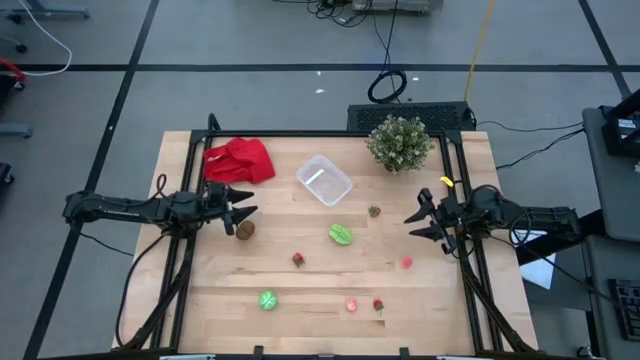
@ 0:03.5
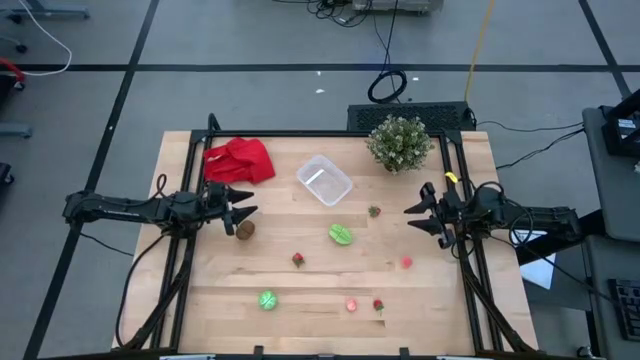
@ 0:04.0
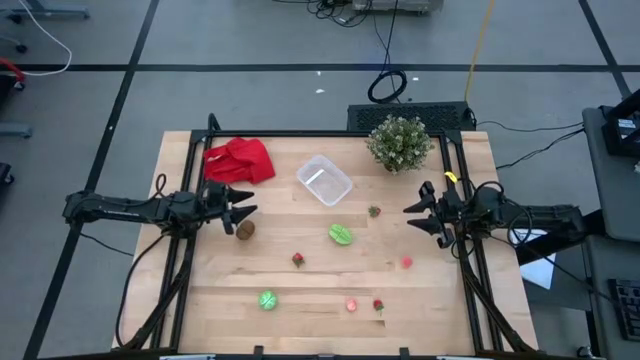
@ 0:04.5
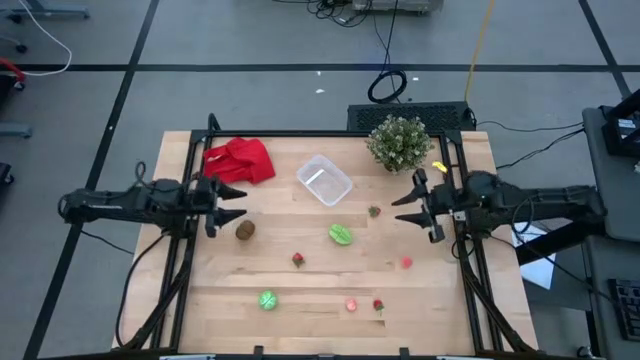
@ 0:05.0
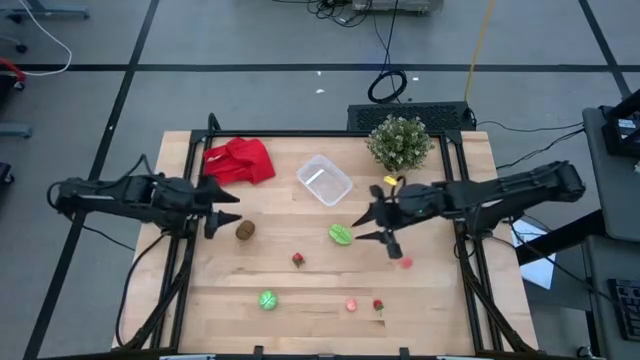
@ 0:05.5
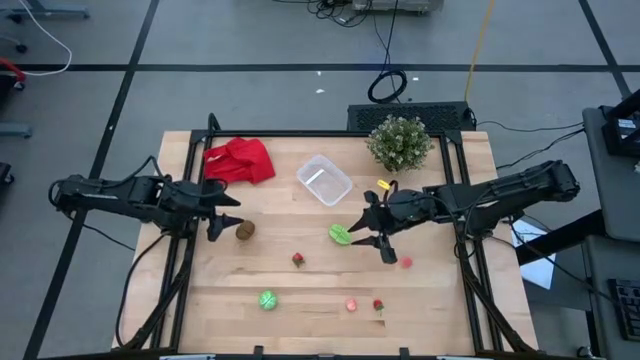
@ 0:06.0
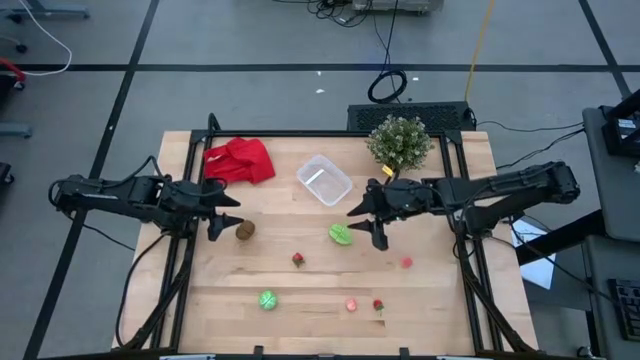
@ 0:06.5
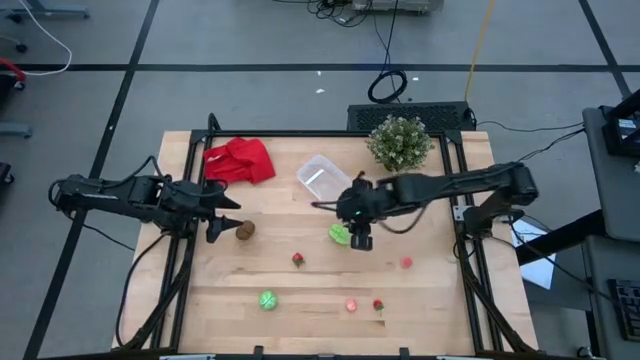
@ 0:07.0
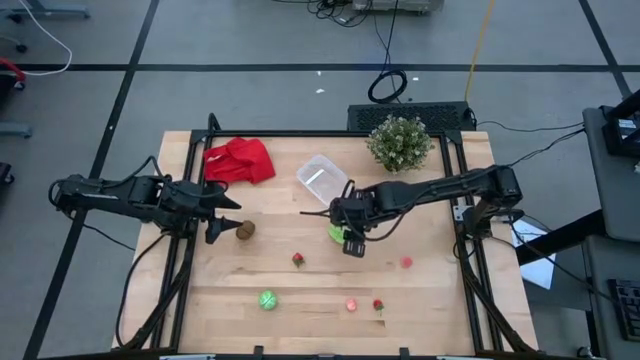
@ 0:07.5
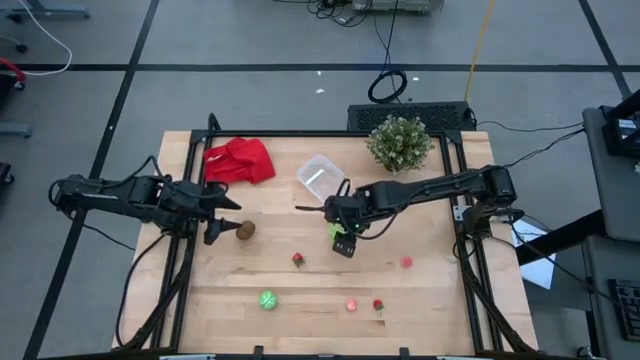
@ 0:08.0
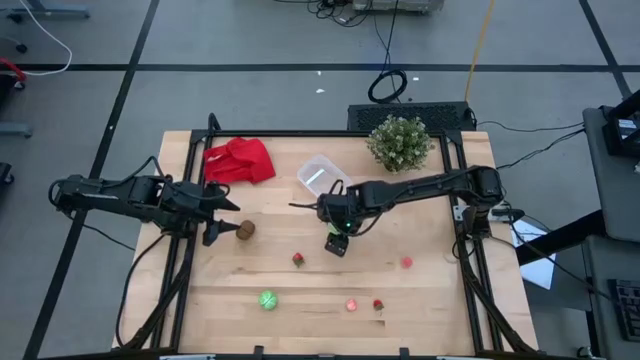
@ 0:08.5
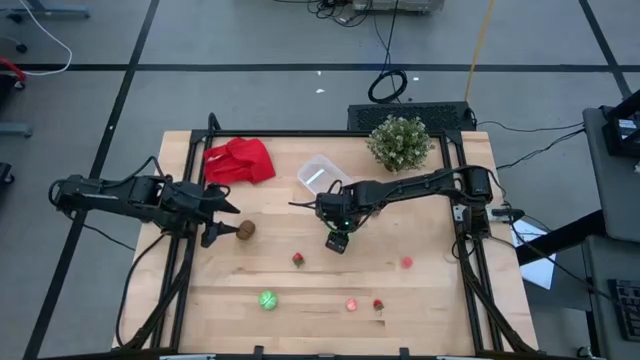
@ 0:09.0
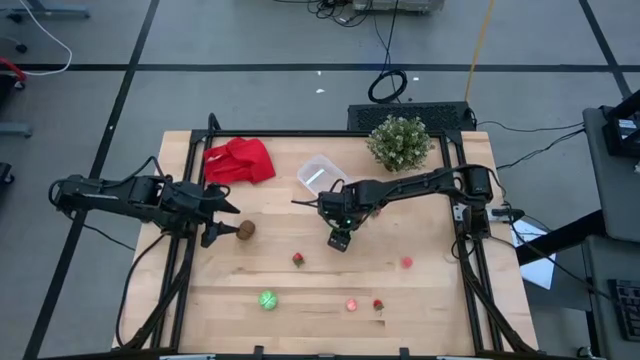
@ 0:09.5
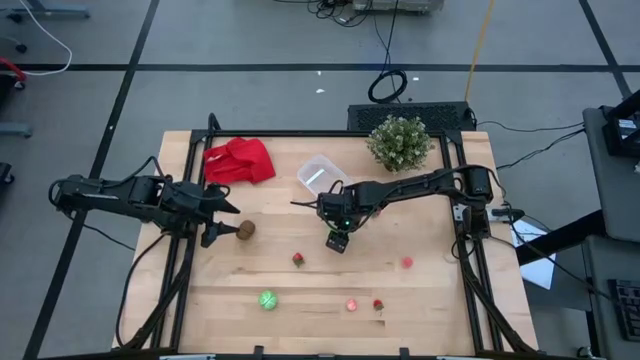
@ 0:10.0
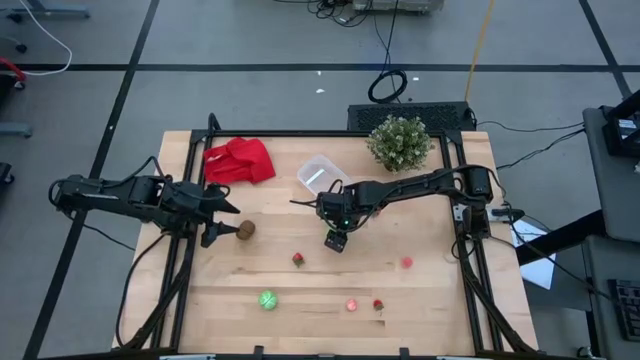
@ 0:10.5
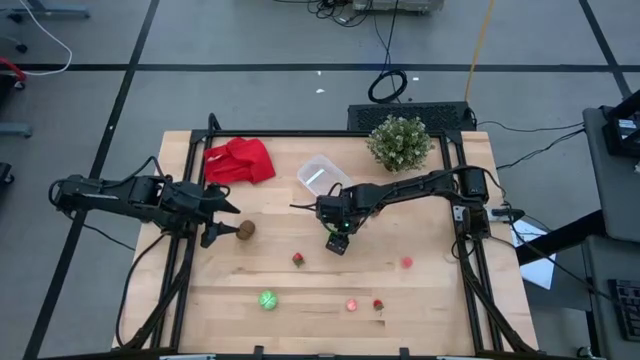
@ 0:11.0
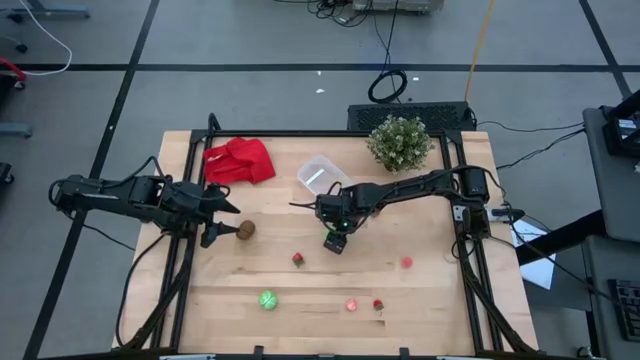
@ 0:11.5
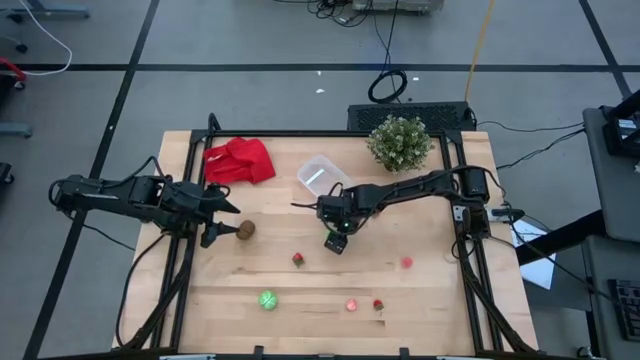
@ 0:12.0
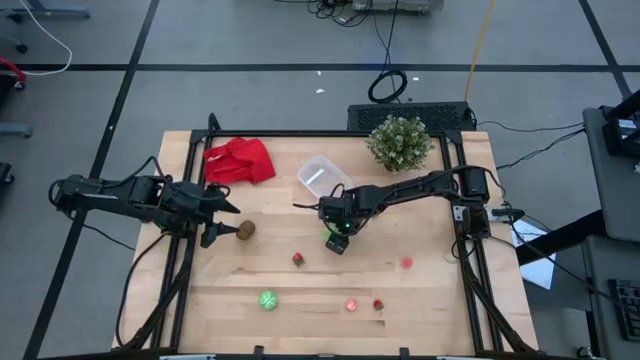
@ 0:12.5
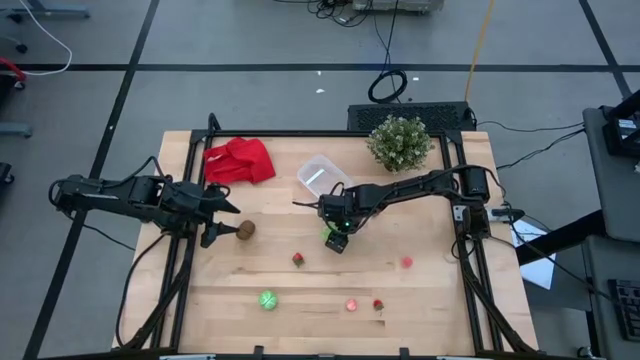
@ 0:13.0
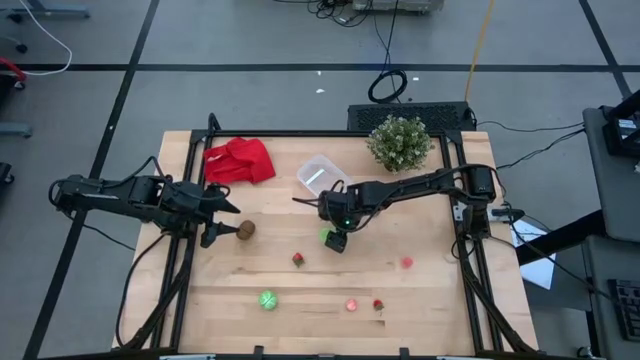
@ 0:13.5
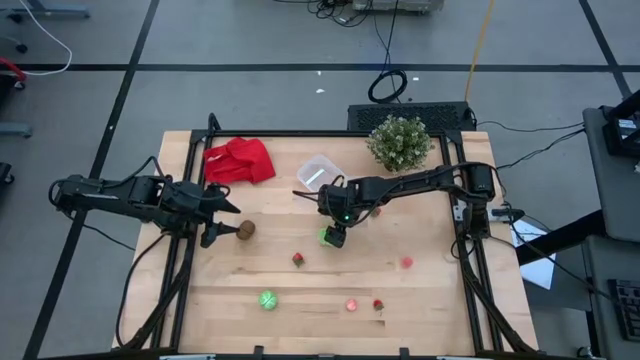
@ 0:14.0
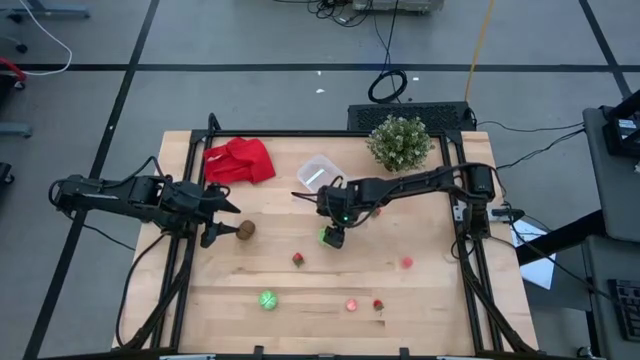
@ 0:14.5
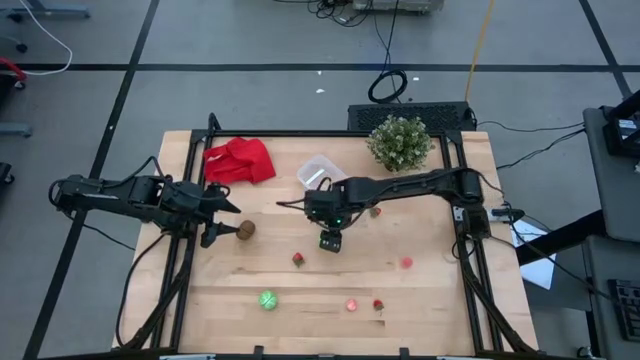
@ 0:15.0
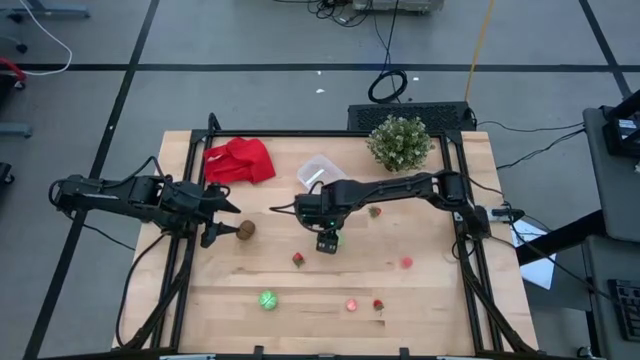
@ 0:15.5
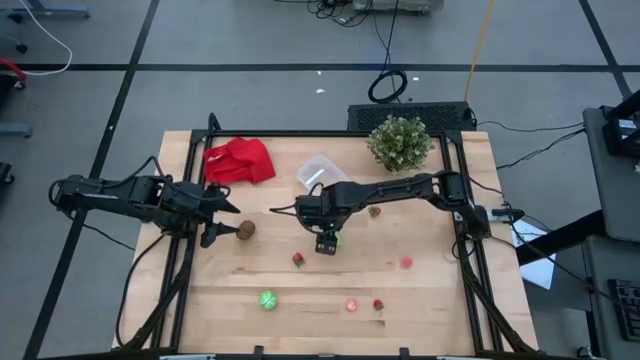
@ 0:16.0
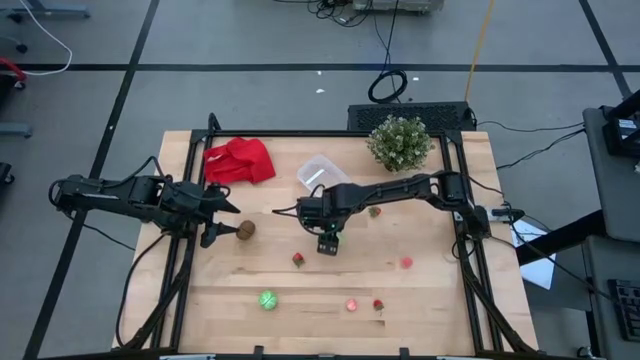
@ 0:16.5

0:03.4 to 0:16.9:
Task: Pick and placing Produce into tupperware
Put the green starfruit into the transparent bin

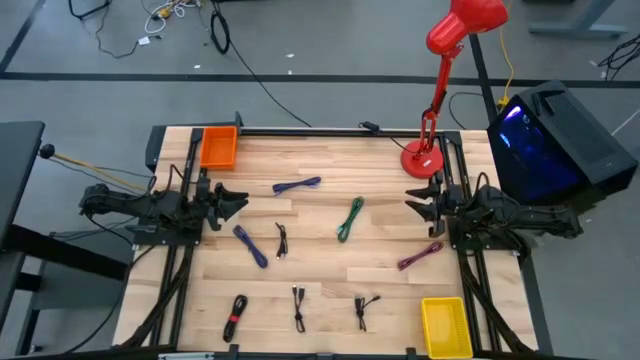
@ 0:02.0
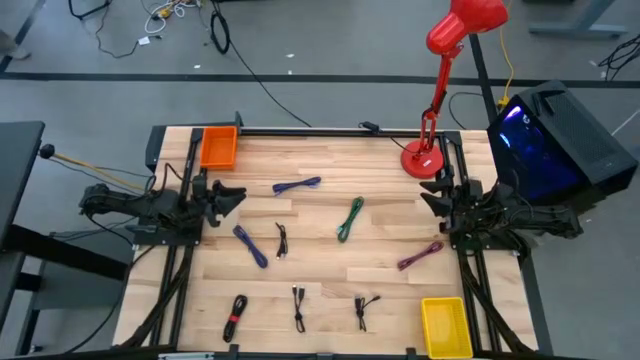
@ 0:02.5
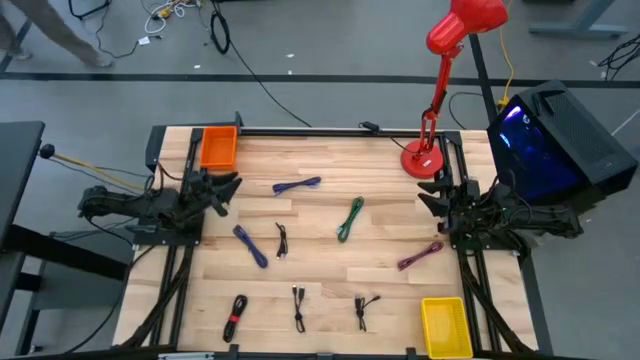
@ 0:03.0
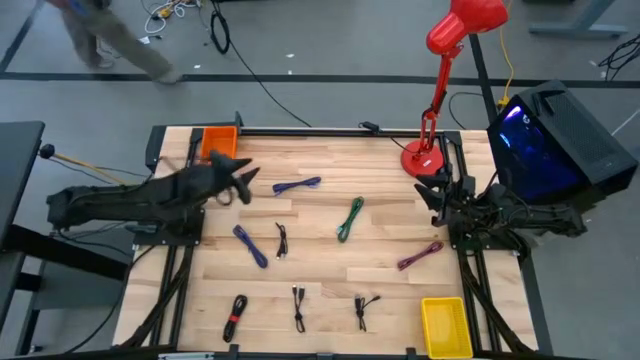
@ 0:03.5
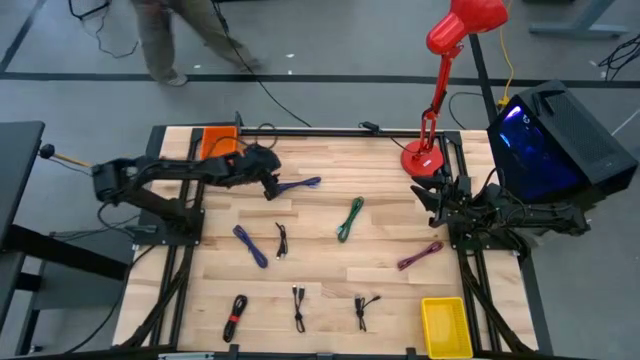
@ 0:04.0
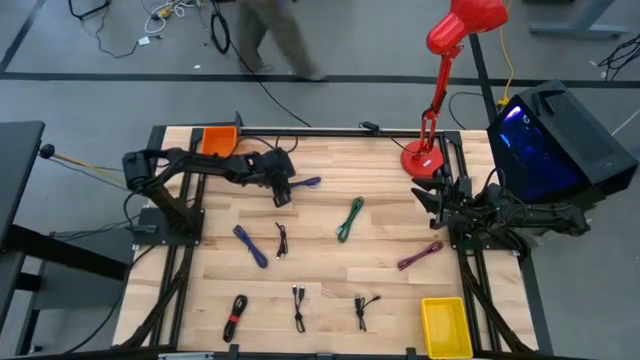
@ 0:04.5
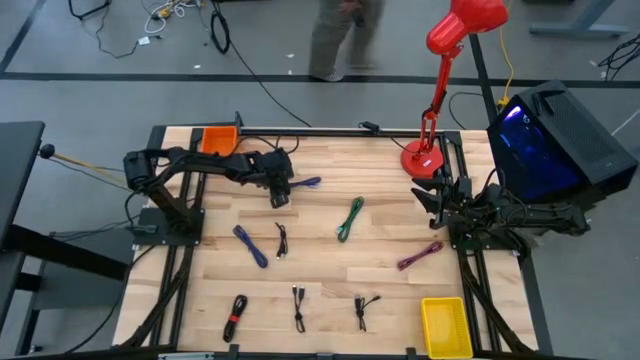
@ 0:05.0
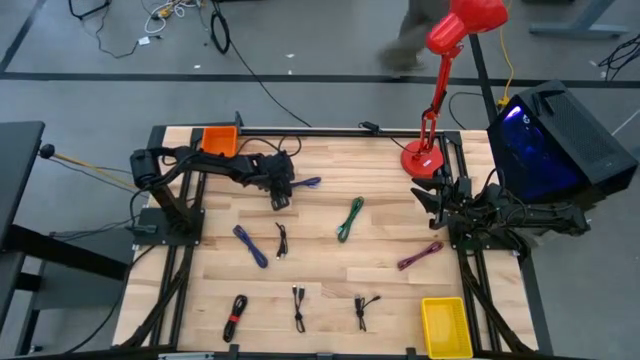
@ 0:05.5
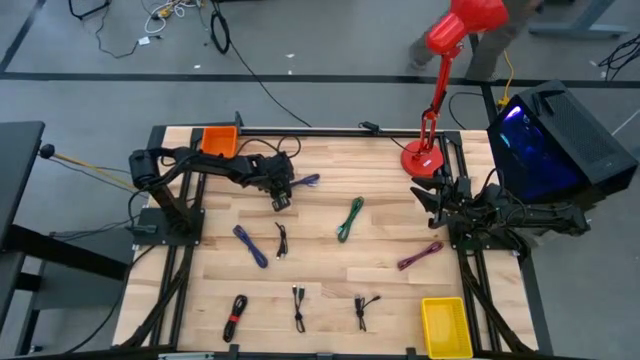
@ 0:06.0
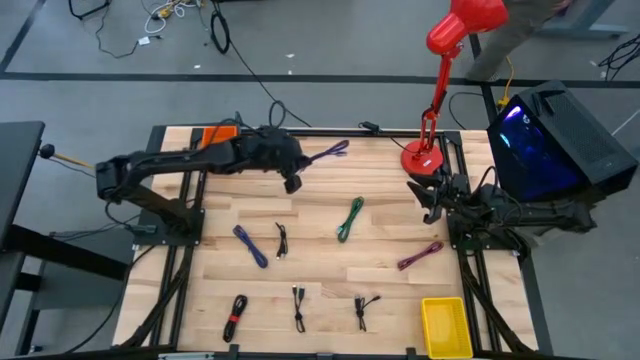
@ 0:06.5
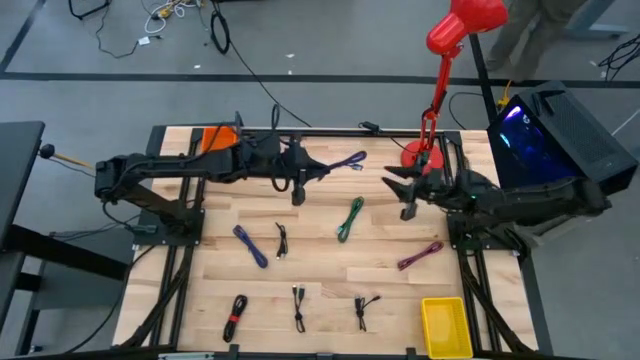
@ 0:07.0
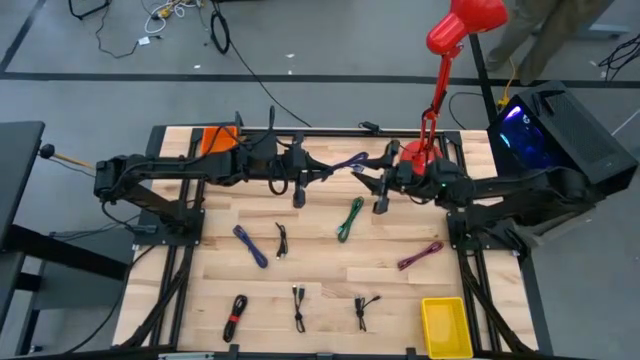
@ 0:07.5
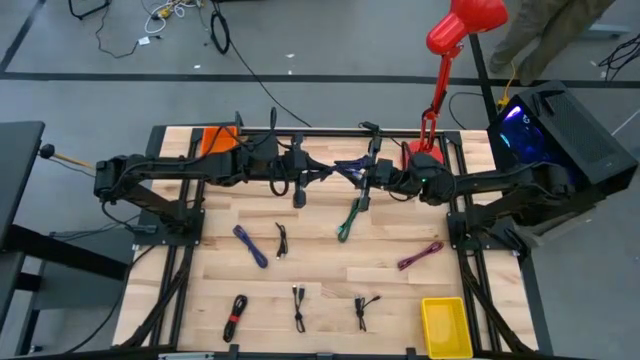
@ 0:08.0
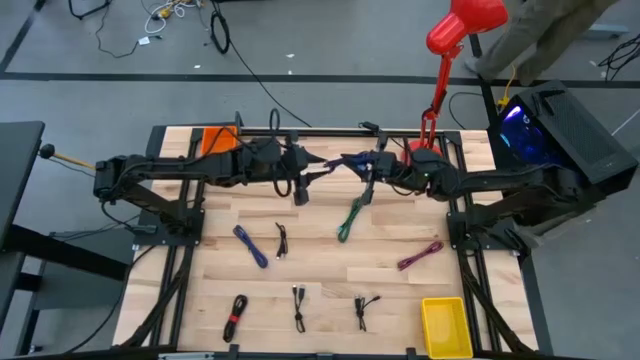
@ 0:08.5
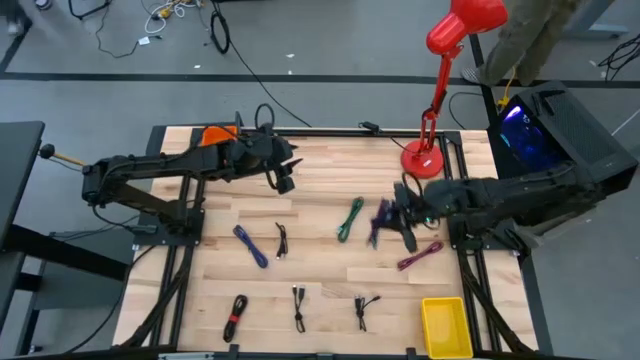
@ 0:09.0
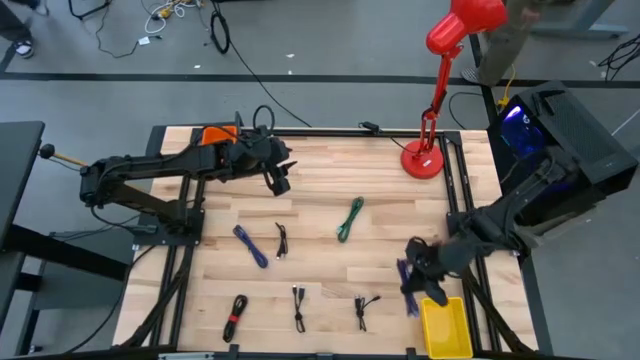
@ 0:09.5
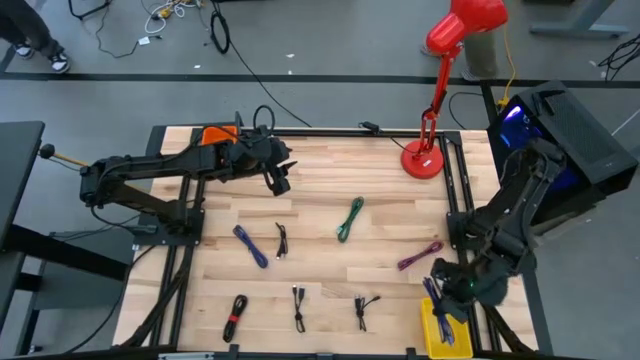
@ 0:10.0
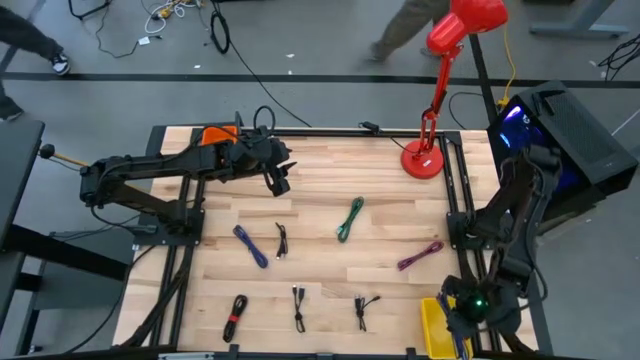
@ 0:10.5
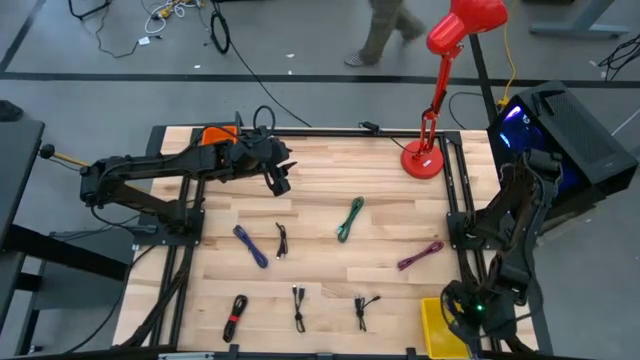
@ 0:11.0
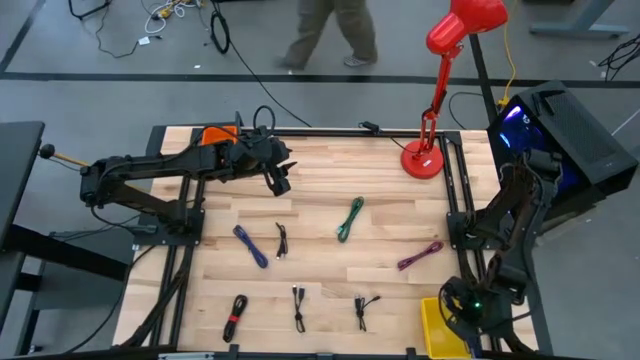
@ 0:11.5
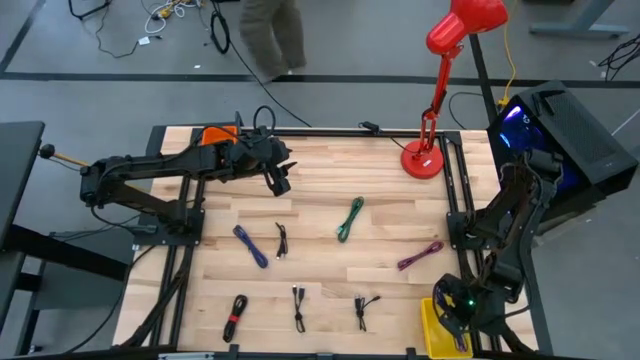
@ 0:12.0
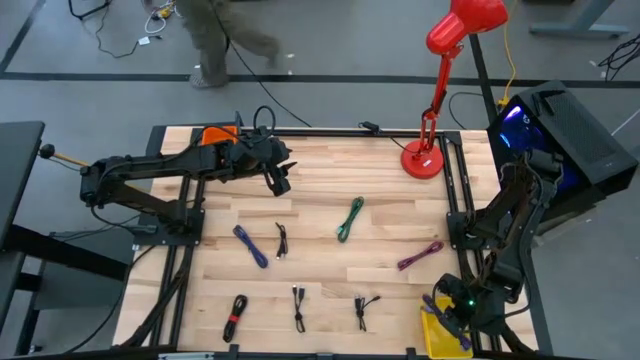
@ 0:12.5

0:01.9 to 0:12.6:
Task: Pick & Place USB Port
Put the top blue patterned charger cable into the yellow bin
